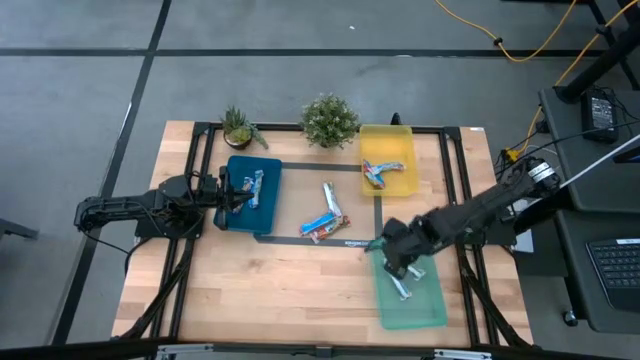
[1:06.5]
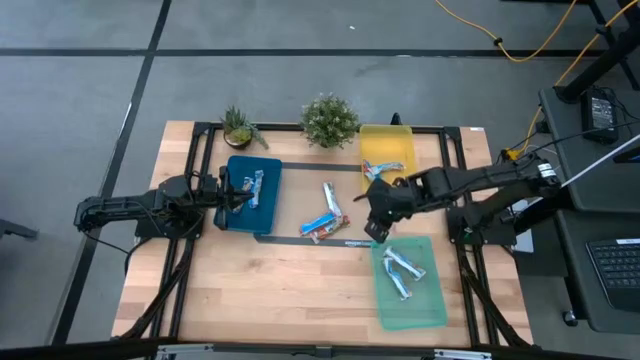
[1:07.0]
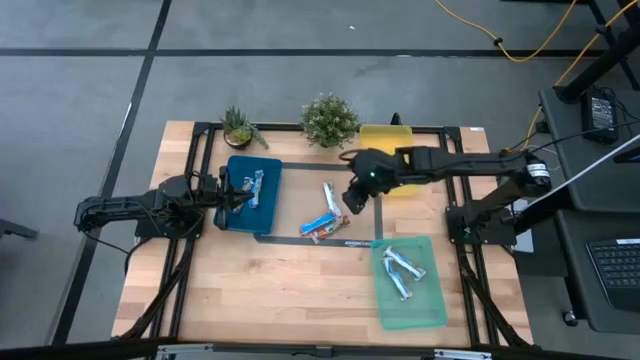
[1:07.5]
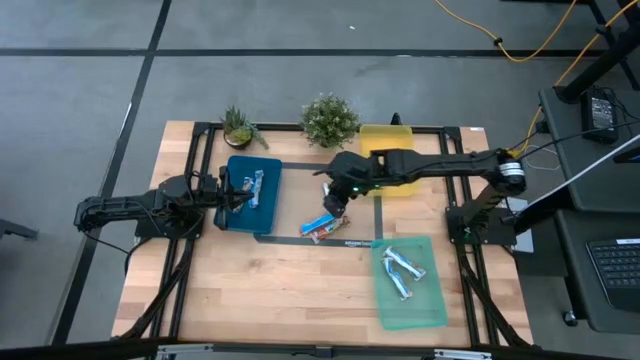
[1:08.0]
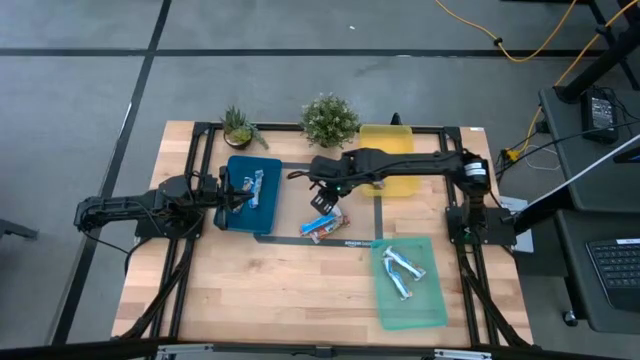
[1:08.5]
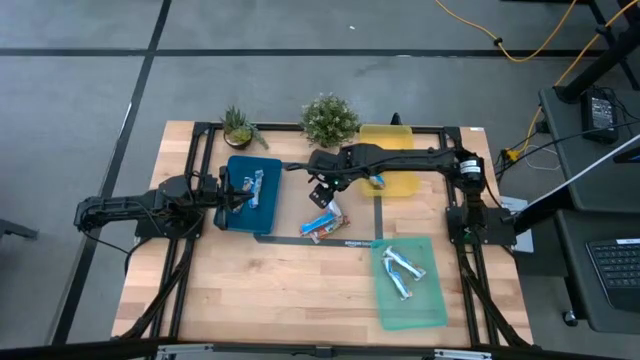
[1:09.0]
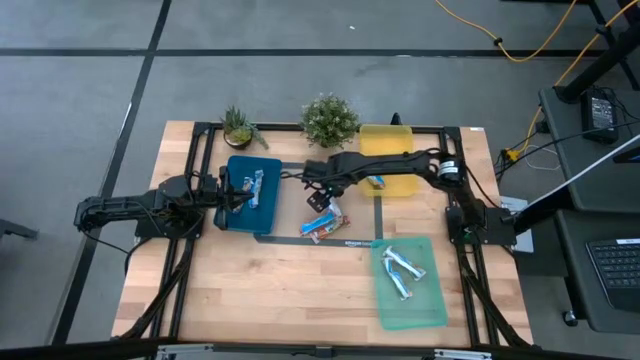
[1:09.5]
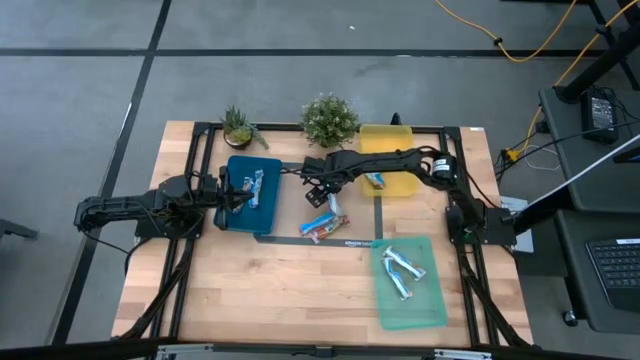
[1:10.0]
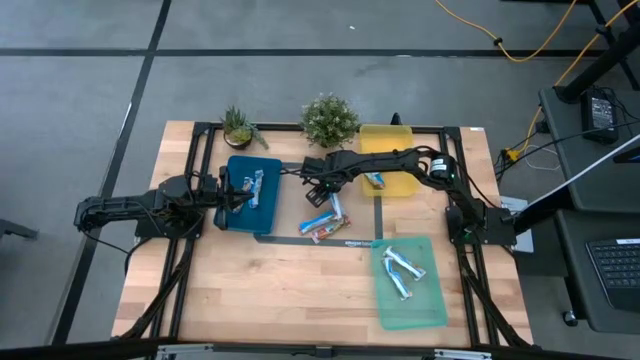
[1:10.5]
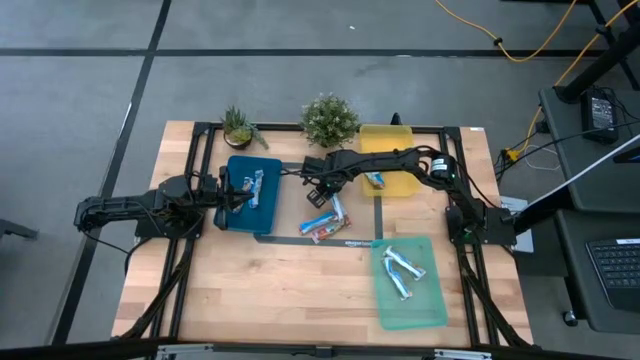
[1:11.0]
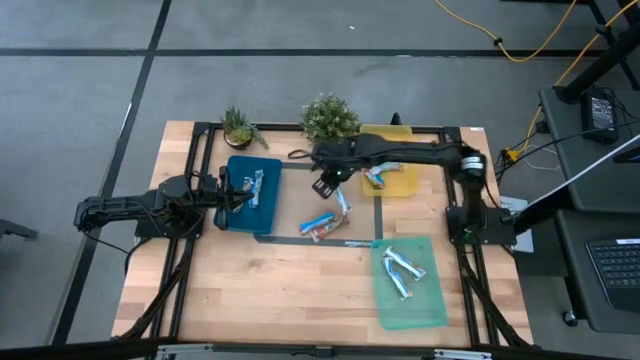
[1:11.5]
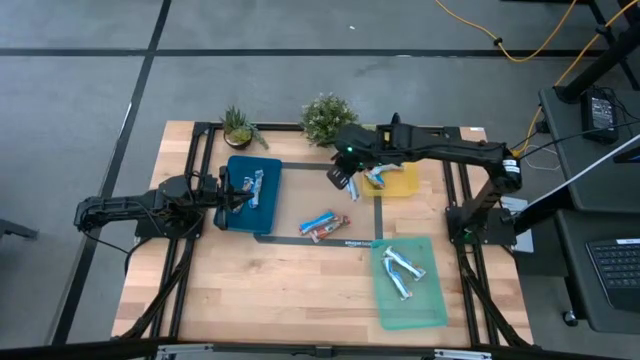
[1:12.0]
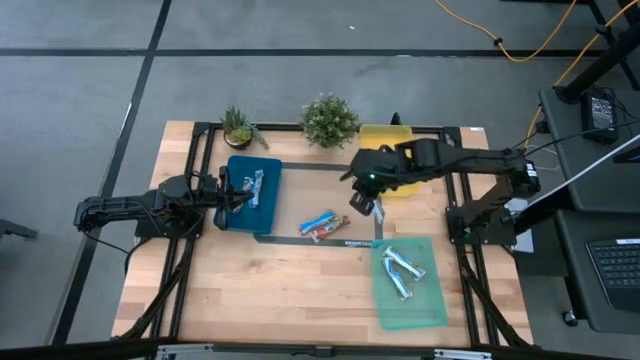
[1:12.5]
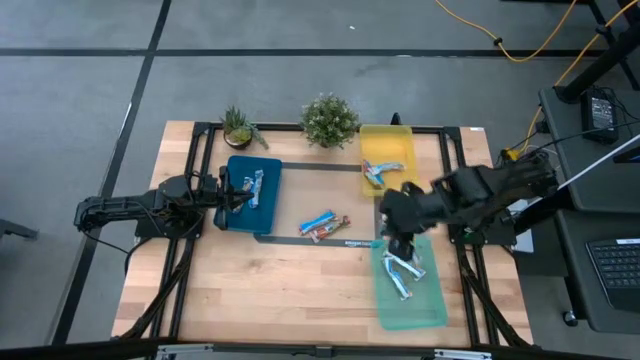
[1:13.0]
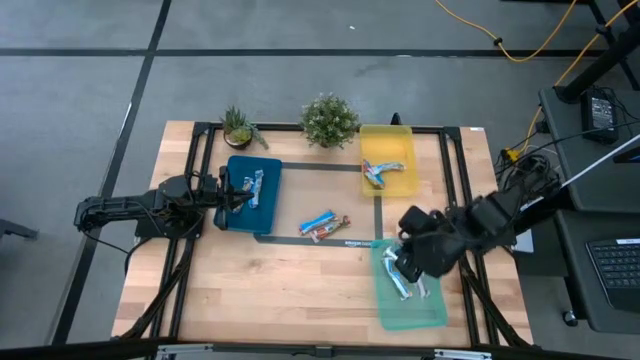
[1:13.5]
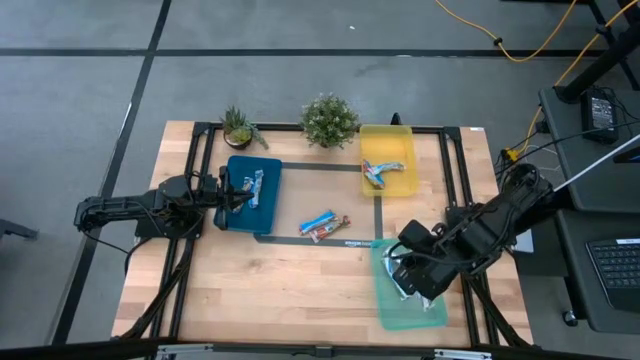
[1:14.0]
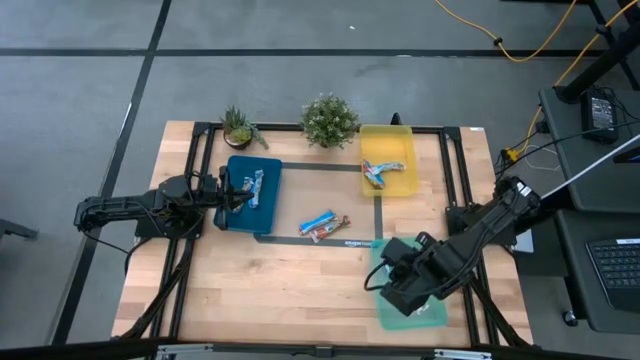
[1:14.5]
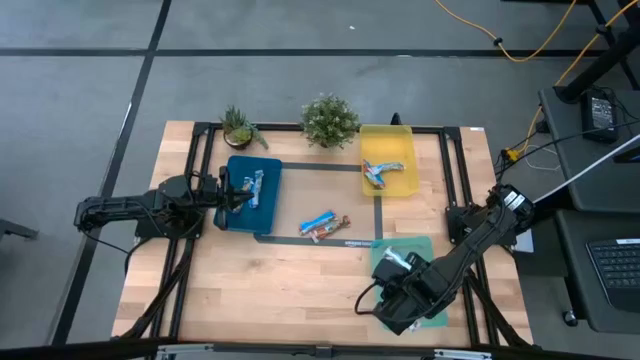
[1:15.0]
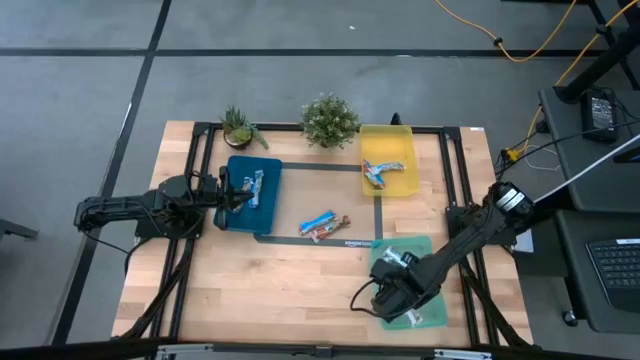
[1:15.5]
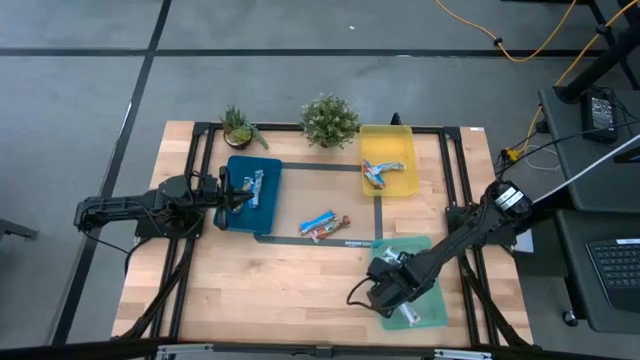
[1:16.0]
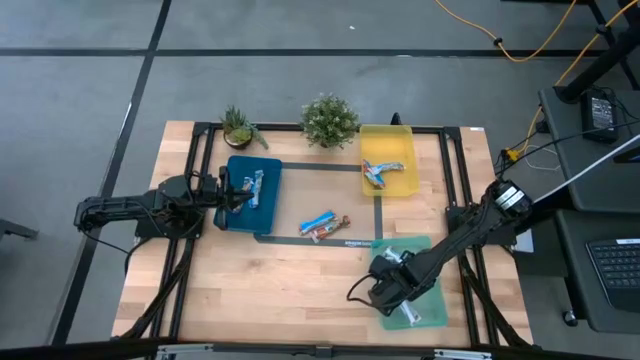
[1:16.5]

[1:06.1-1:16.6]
Task: Pick and place Granola Bars by type
Put the yellow granola bar into the green bin

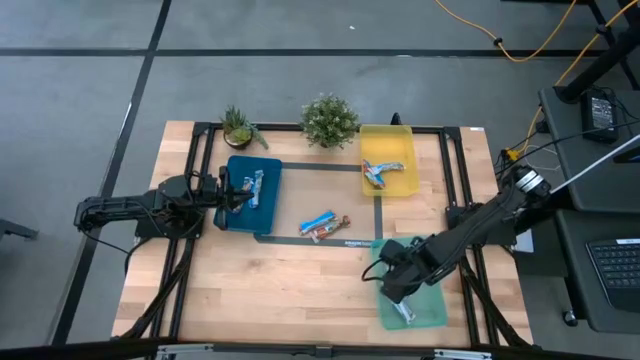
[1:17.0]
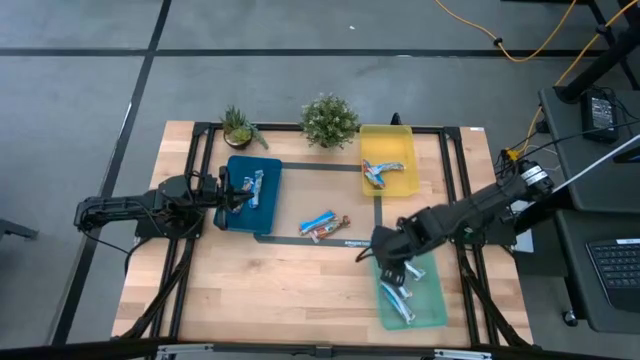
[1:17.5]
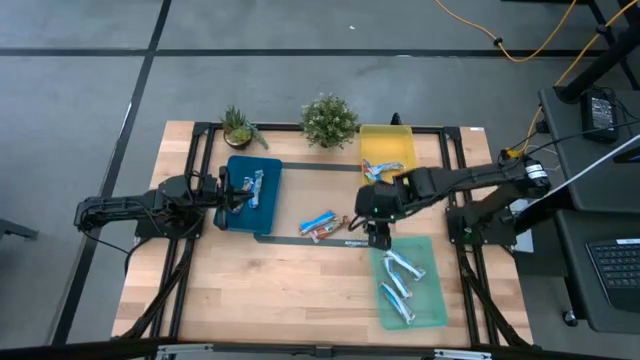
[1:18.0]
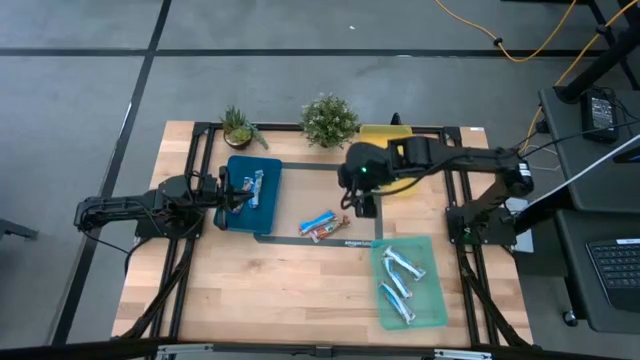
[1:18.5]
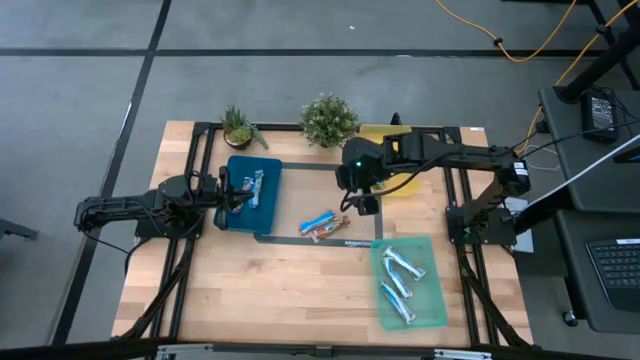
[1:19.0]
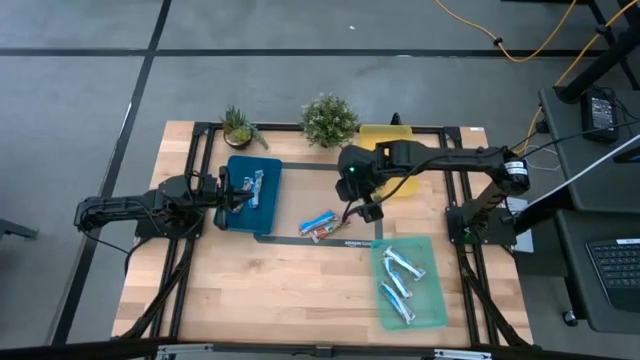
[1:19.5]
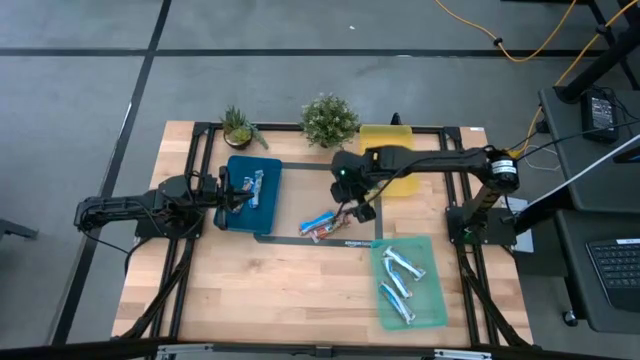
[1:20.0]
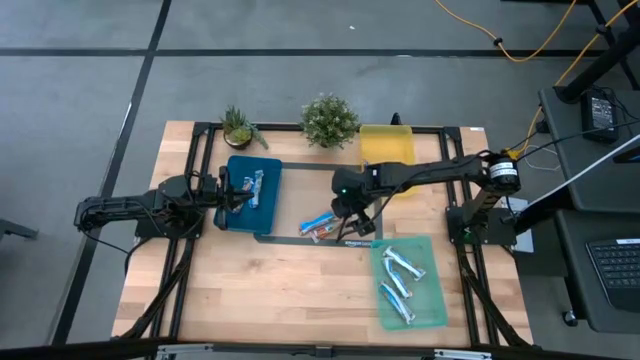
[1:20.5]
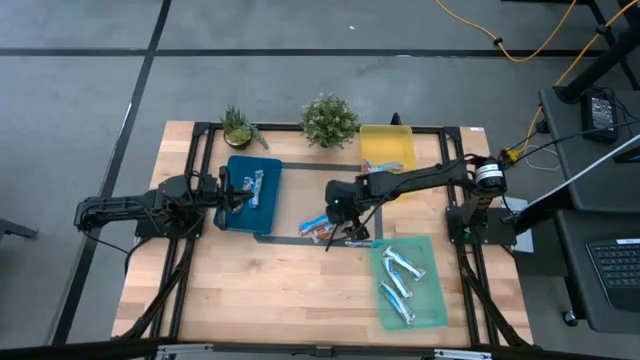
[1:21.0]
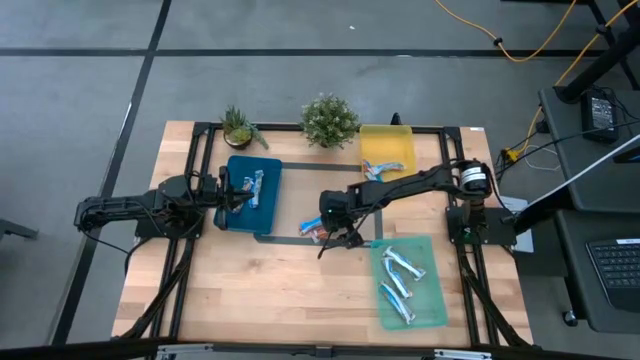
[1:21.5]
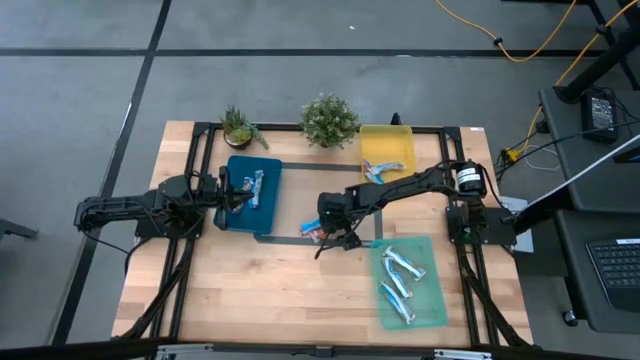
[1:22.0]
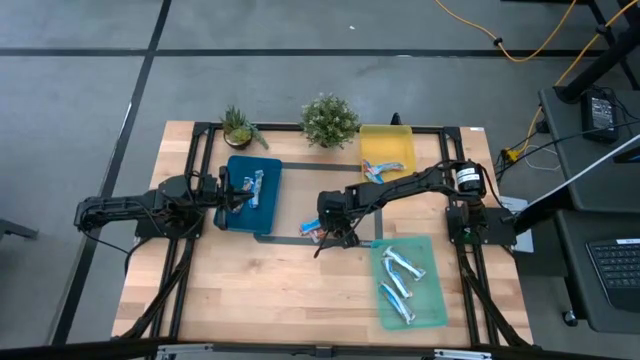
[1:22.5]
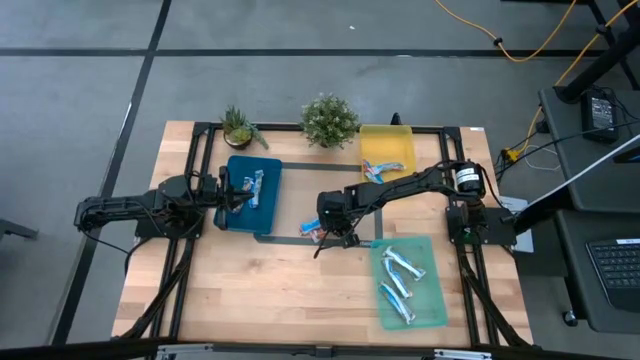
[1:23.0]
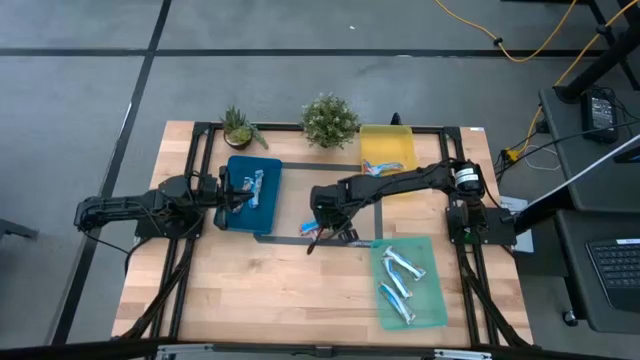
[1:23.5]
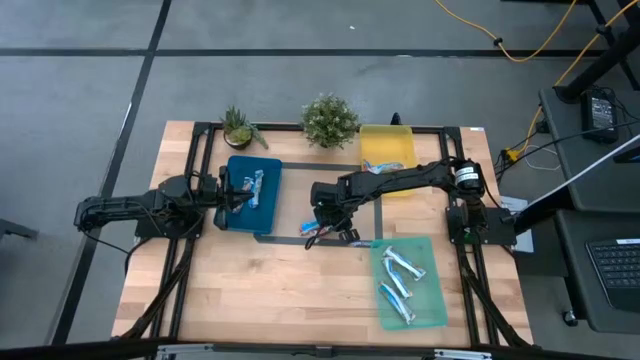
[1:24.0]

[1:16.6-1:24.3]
Put the red granola bar into the yellow bin

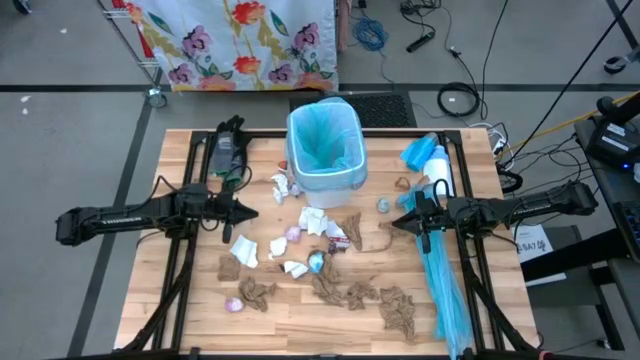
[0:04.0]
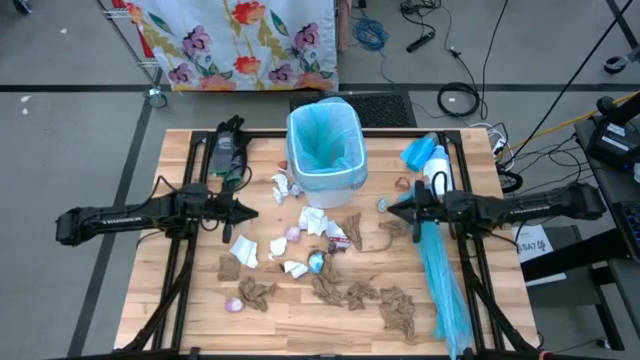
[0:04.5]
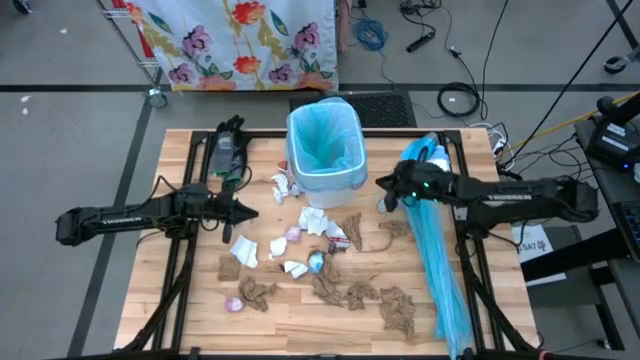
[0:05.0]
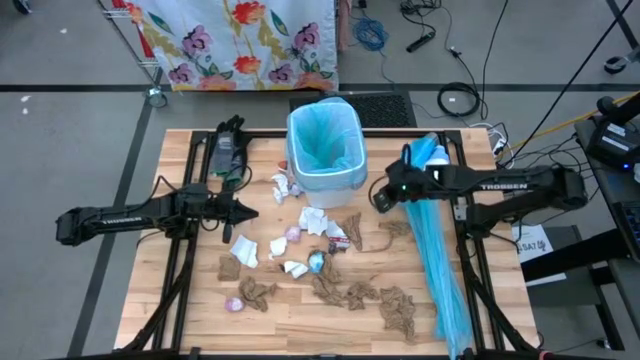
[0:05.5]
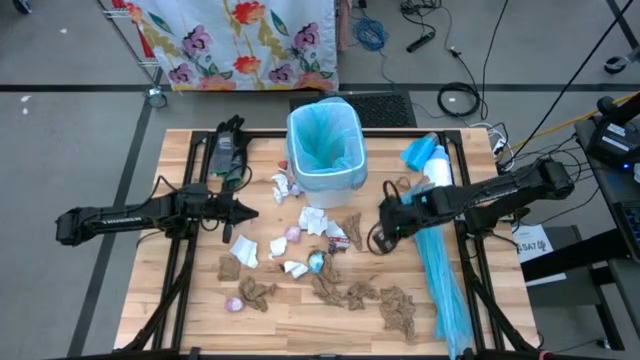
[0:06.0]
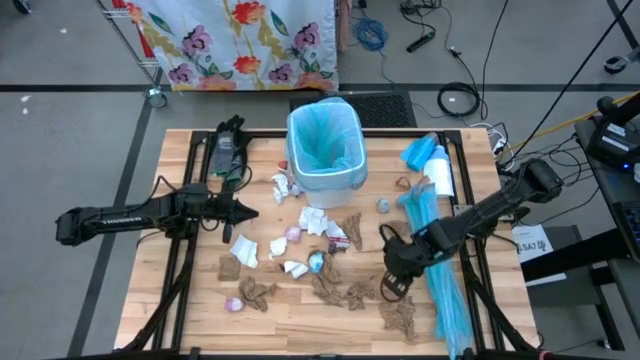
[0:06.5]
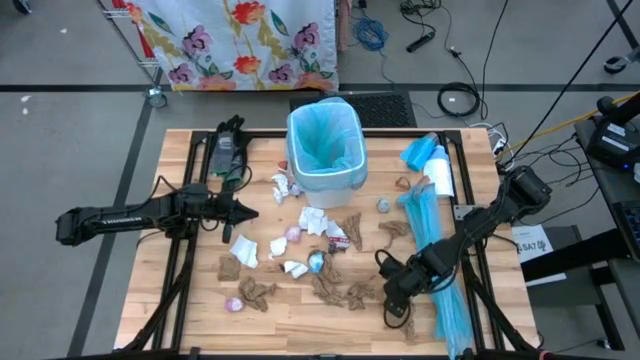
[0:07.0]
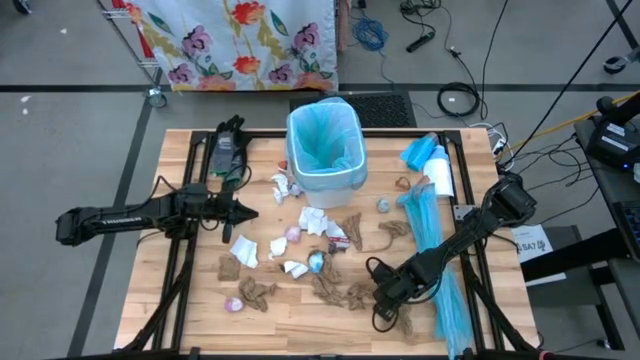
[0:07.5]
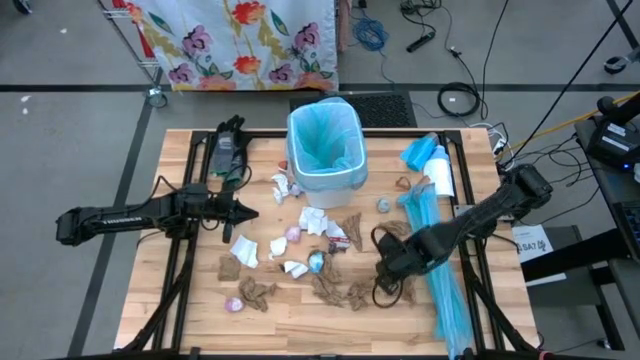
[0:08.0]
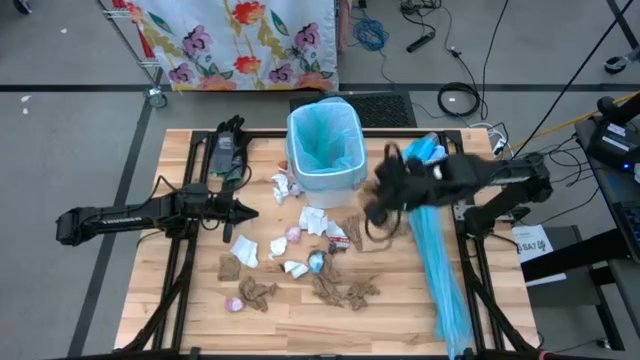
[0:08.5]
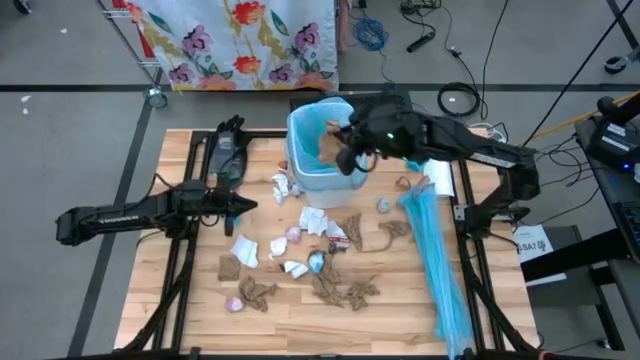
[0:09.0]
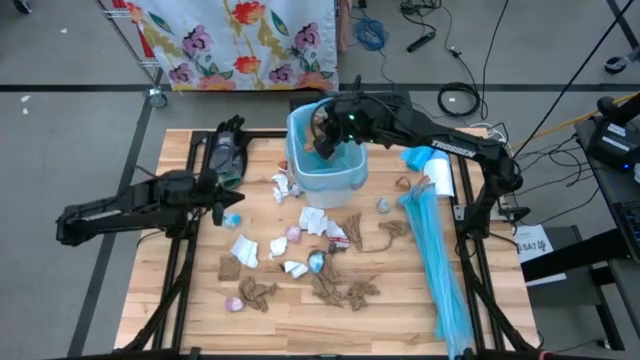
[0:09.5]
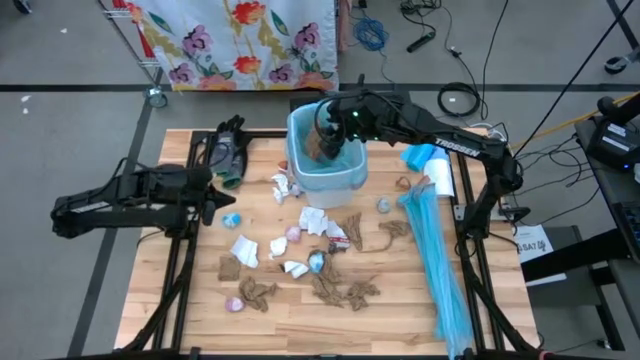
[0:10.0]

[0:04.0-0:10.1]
Task: place trash/remove bag and relplace
Put the brown napkin into the trash bin
